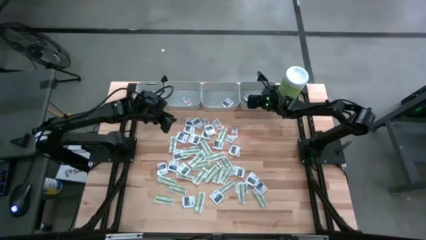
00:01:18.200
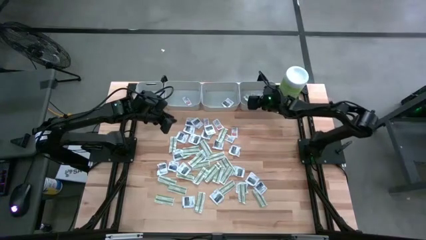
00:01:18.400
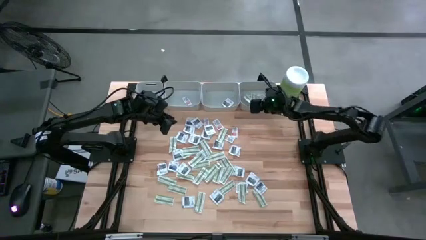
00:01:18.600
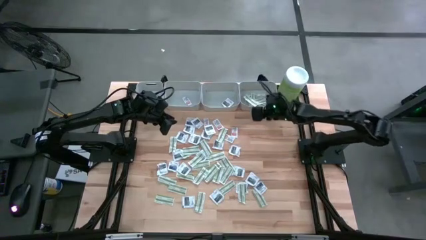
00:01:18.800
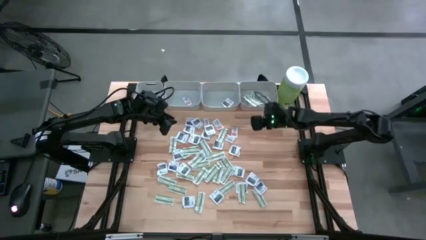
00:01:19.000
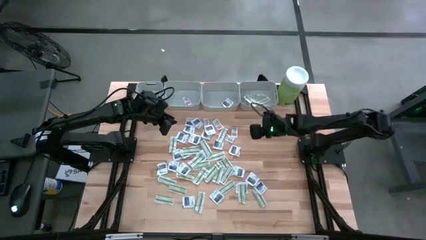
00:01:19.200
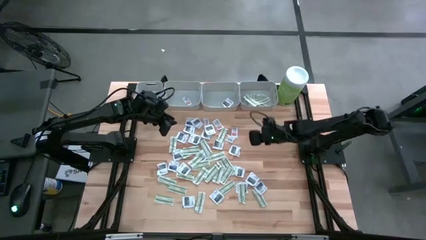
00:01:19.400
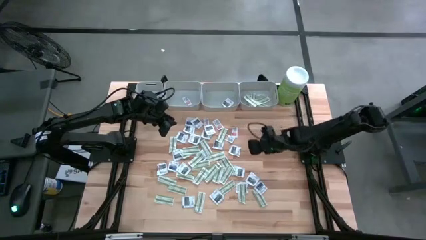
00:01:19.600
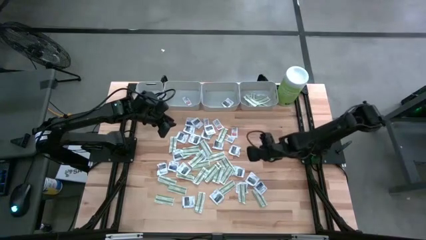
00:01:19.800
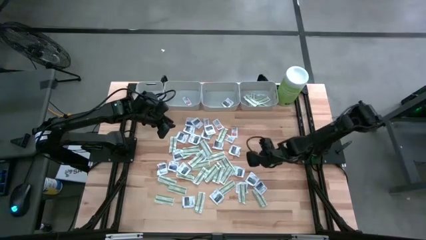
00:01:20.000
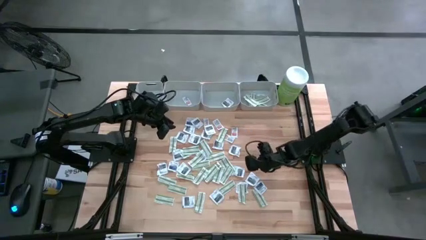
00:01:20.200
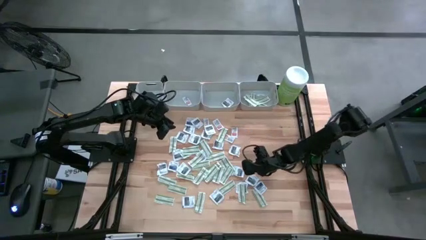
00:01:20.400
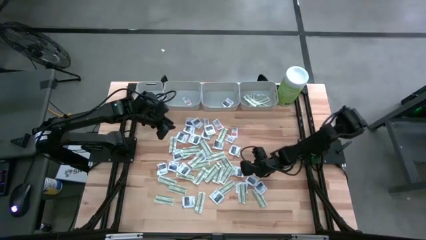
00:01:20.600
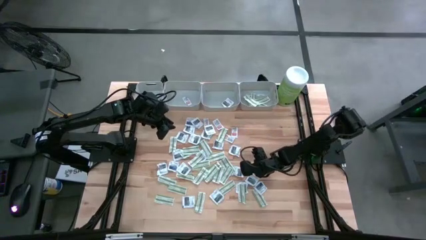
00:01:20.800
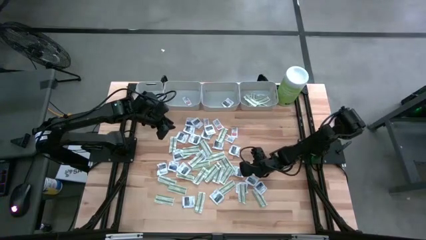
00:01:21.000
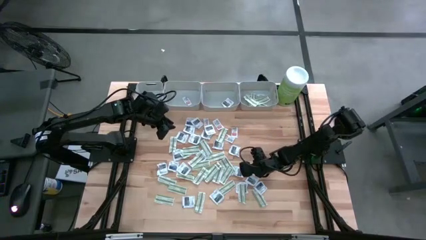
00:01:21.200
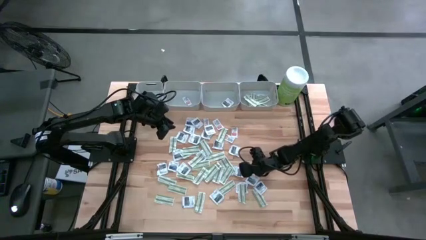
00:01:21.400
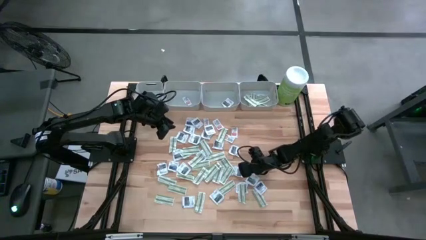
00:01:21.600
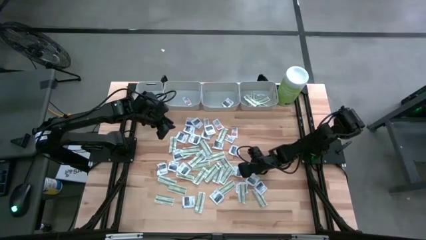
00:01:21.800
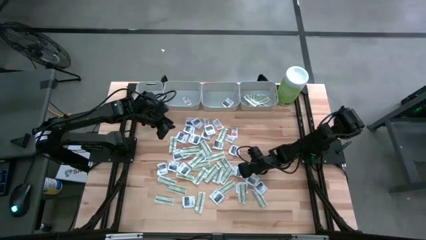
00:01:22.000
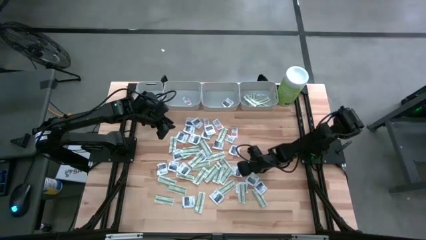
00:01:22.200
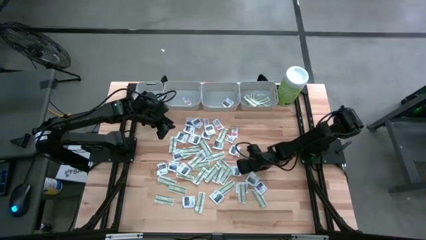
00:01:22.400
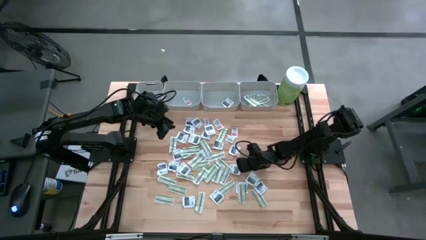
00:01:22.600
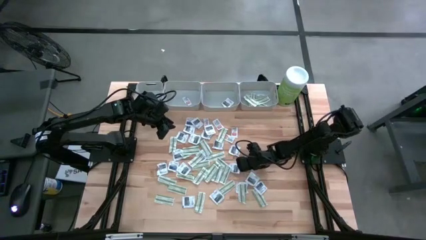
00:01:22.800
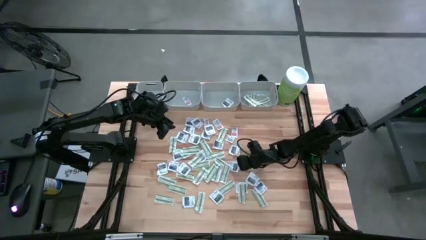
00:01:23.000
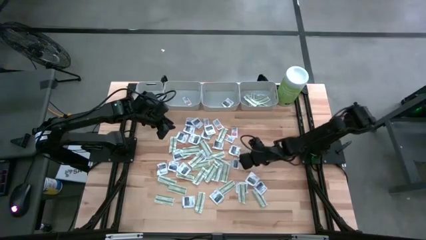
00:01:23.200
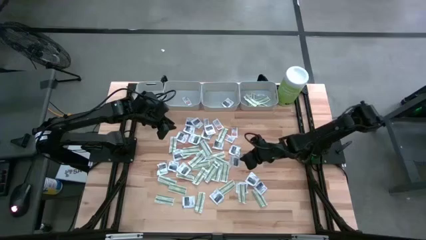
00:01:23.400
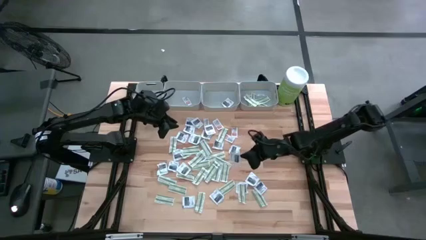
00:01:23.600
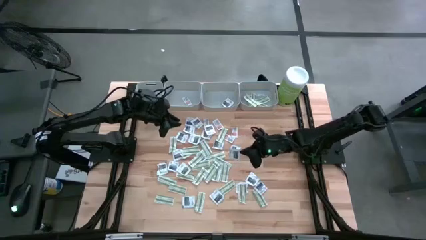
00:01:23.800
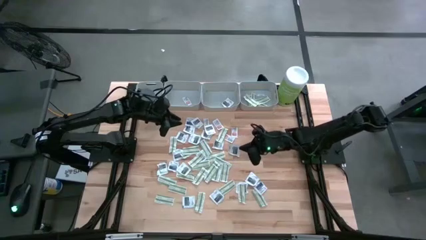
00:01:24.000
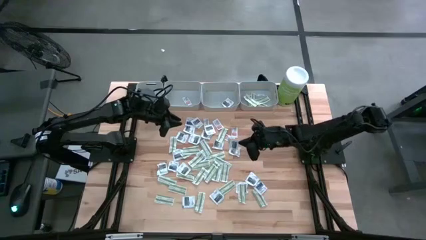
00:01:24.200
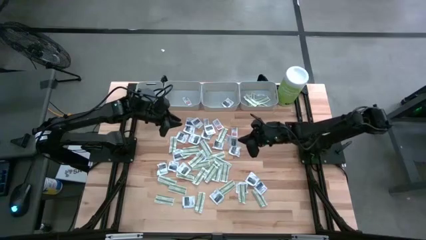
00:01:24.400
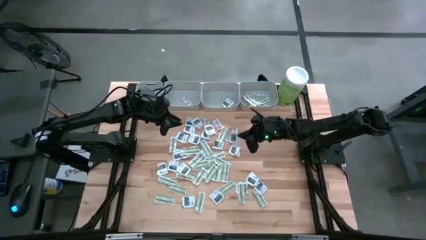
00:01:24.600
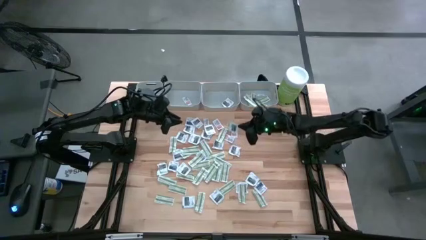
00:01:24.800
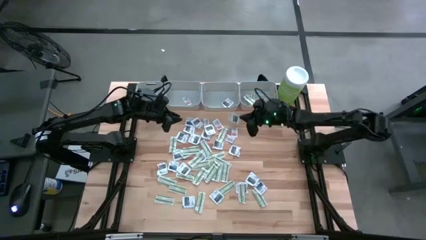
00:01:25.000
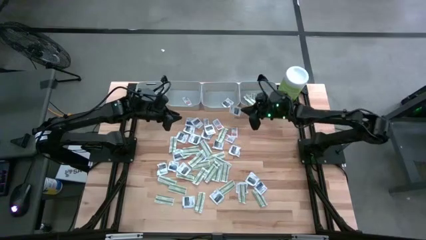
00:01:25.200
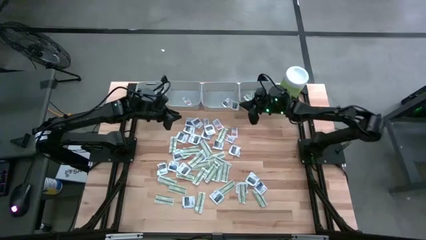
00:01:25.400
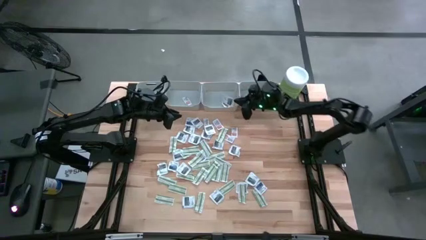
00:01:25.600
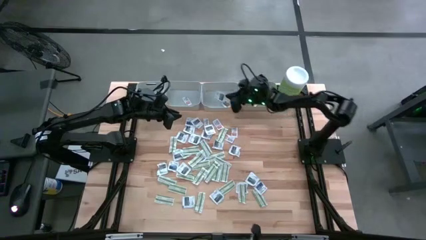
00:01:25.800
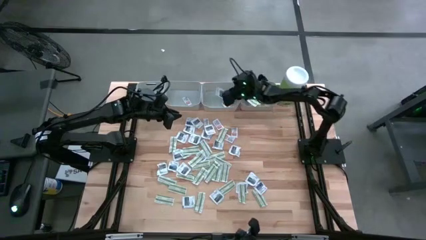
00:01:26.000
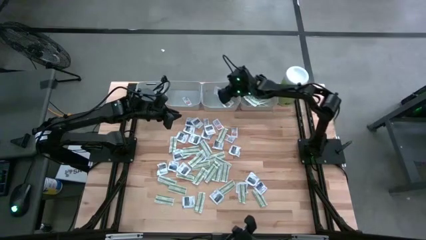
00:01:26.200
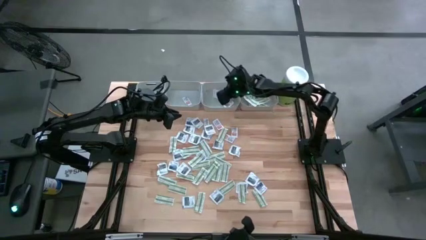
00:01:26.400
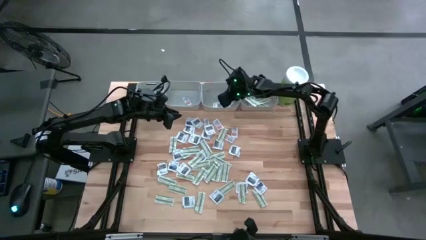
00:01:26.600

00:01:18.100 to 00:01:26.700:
Task: Pick & Place First Aid Supplies
Put the gray towelette pack into the middle right gray bin

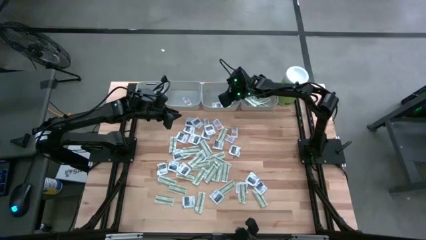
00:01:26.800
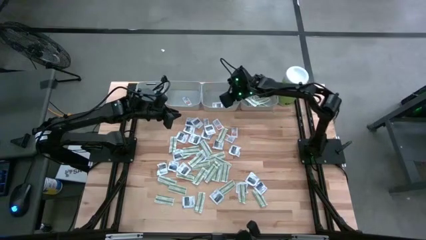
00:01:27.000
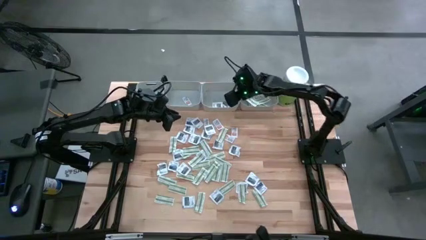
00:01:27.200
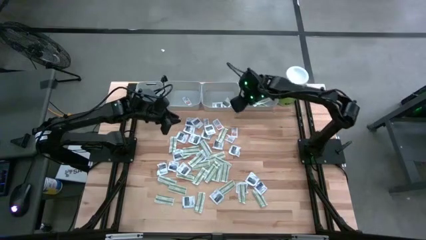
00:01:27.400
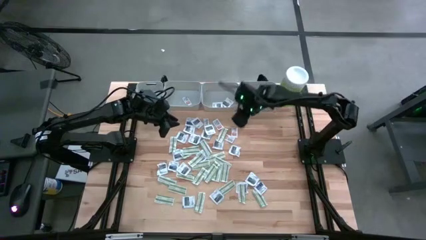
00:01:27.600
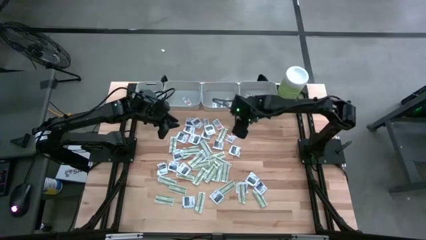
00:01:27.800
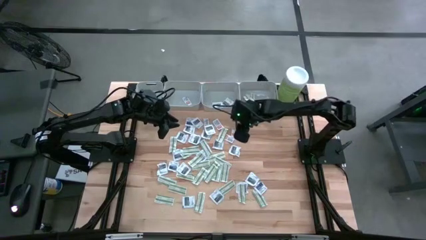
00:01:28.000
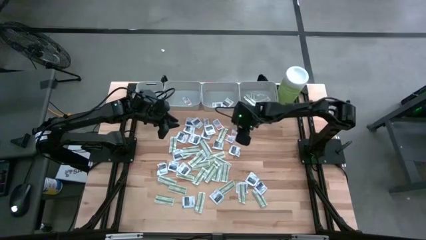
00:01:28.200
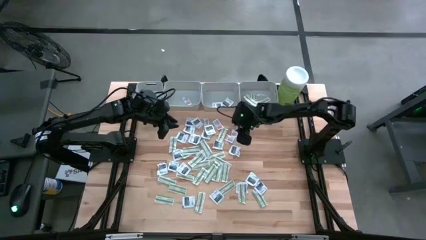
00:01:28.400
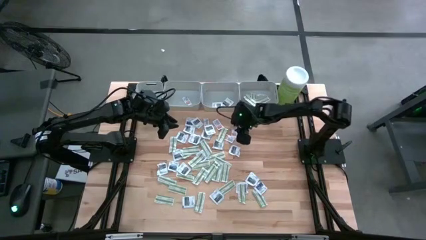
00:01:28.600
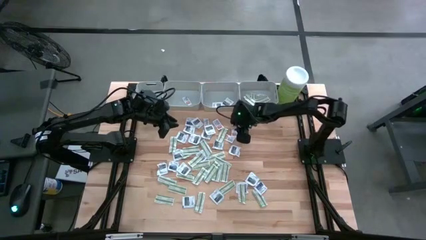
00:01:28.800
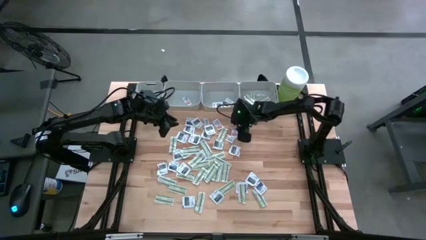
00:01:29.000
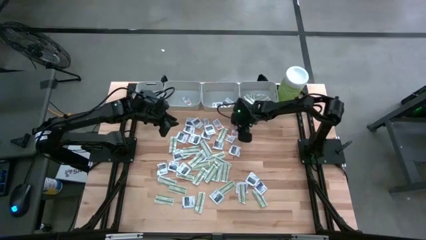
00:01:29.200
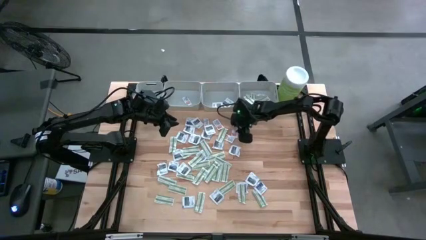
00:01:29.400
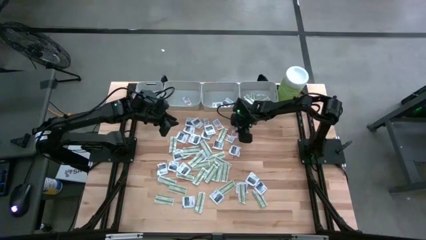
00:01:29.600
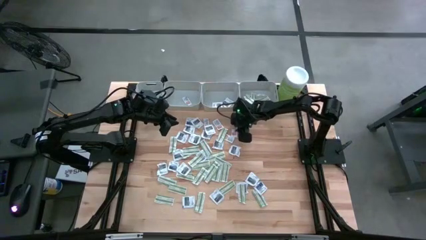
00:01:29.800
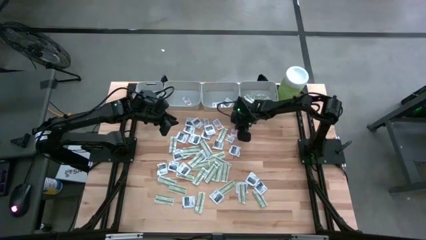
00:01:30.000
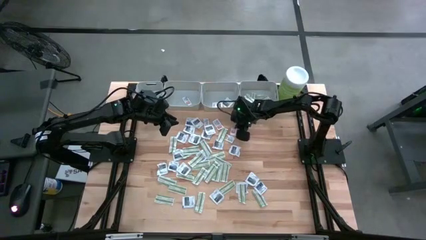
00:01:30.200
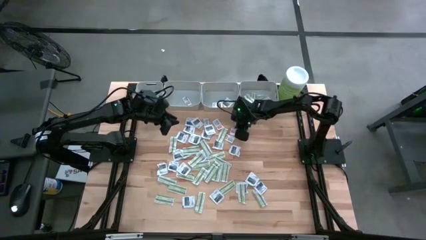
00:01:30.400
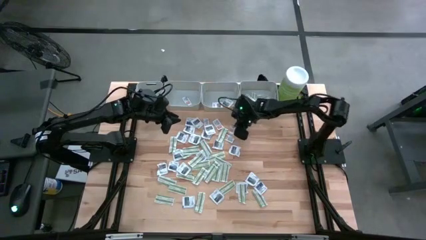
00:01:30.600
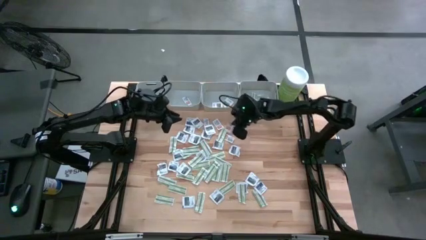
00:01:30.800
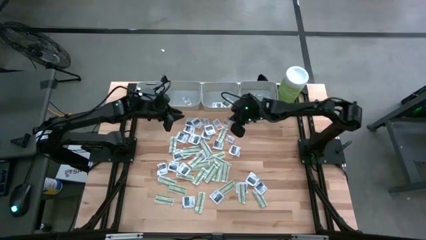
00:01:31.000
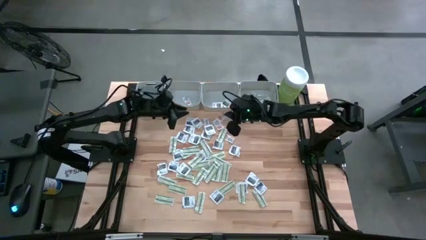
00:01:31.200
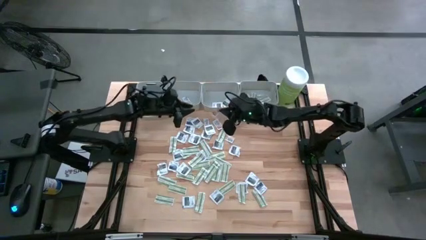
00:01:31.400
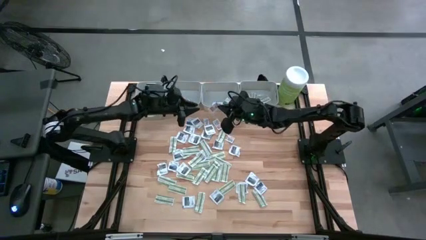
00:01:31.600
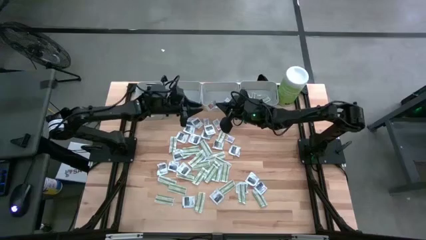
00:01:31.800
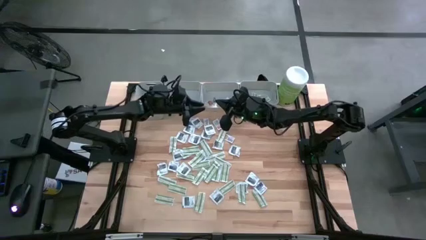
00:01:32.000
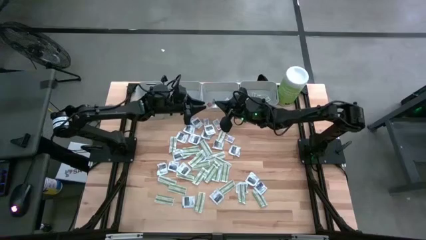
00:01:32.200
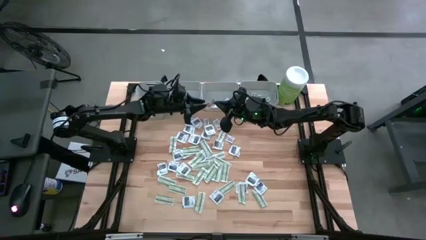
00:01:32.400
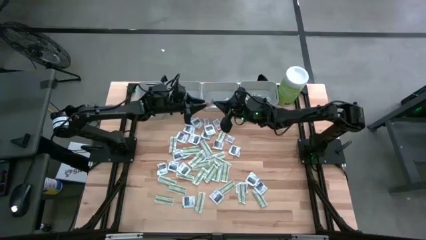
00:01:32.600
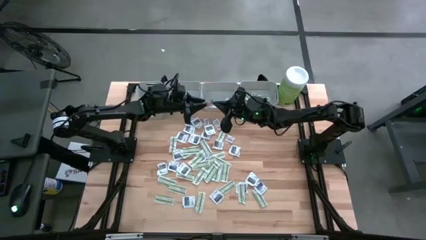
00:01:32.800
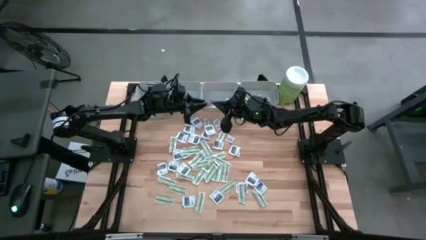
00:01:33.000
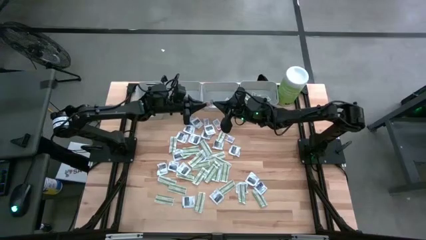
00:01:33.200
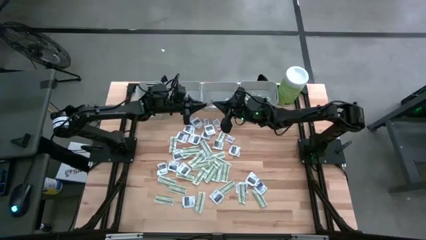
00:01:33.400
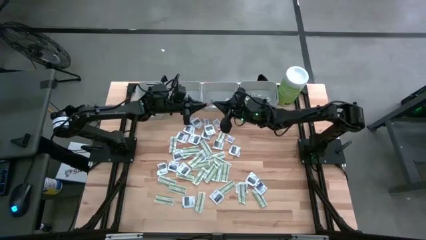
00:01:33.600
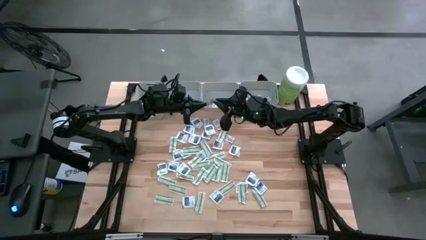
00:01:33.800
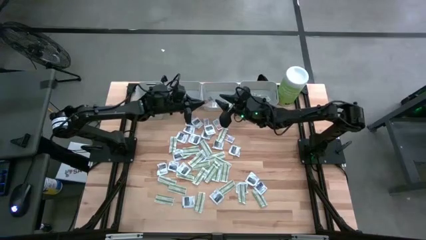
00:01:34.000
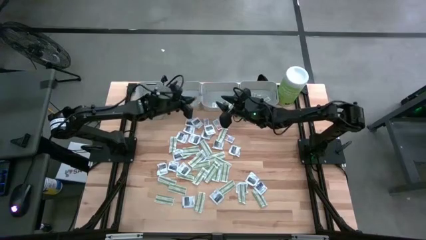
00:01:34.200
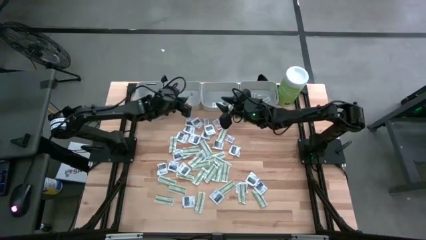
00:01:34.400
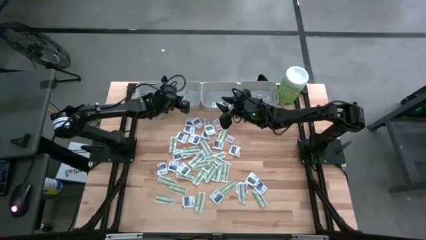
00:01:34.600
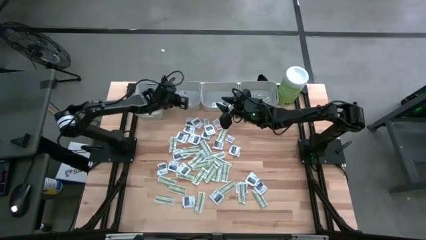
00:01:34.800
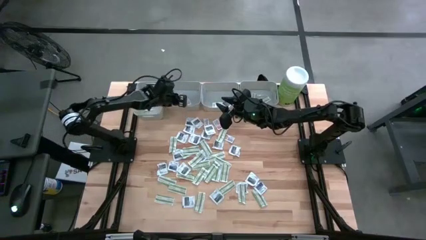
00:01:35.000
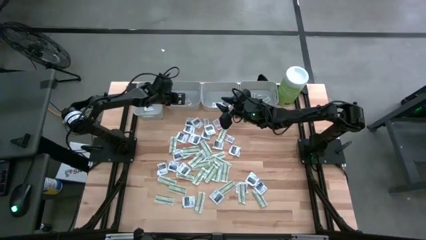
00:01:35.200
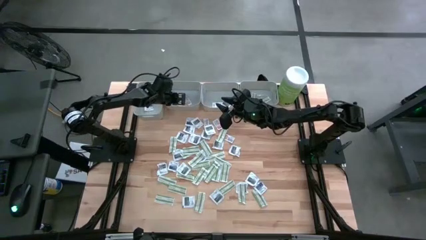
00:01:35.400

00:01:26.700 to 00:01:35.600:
Put the orange ointment pack into the middle left gray bin
